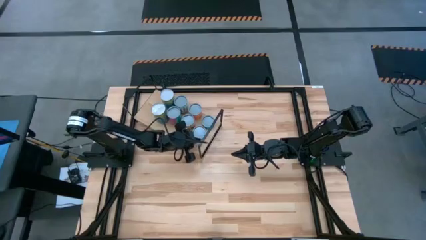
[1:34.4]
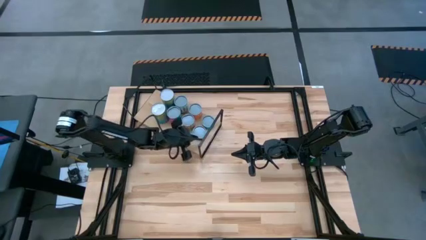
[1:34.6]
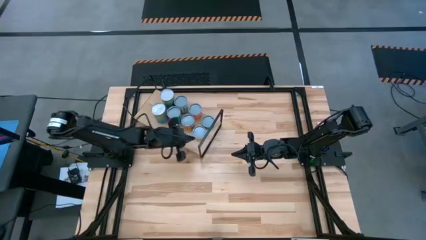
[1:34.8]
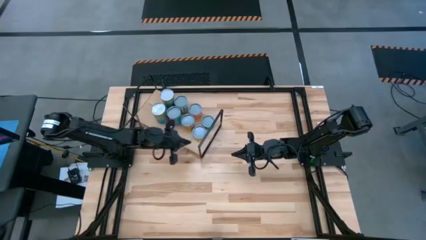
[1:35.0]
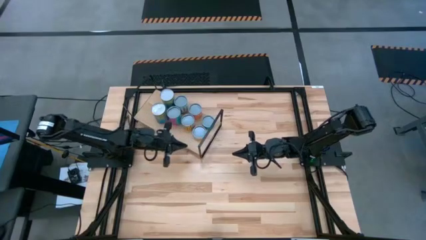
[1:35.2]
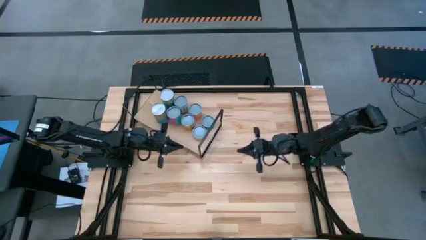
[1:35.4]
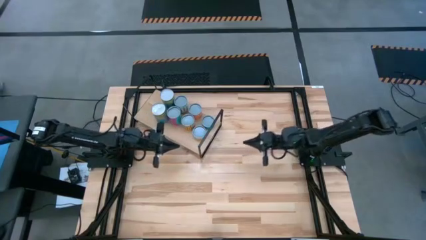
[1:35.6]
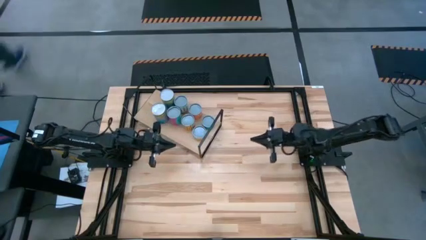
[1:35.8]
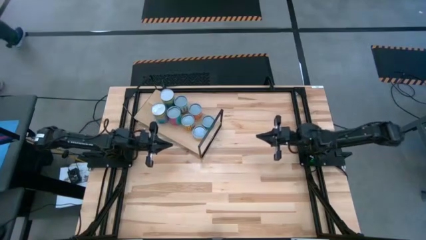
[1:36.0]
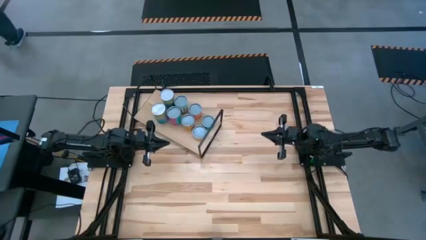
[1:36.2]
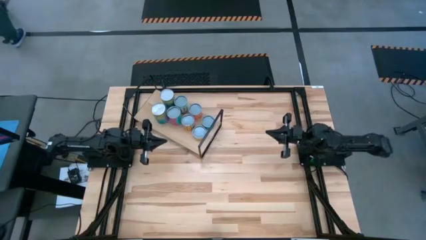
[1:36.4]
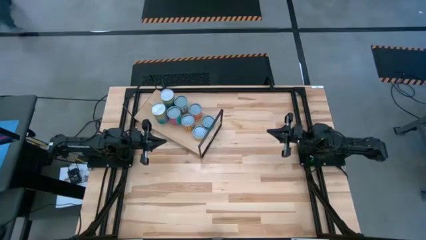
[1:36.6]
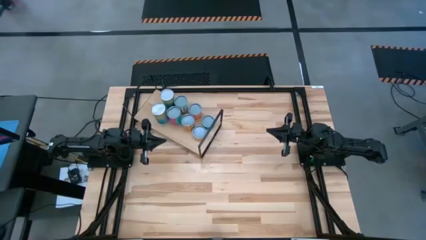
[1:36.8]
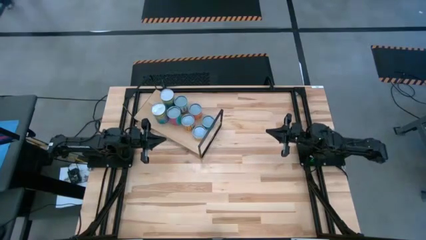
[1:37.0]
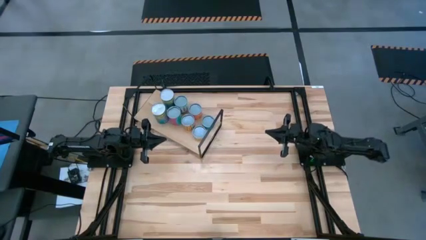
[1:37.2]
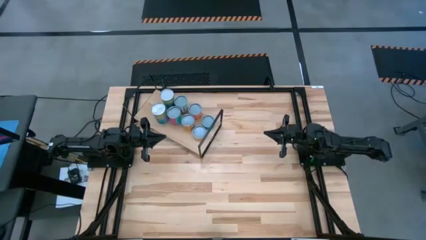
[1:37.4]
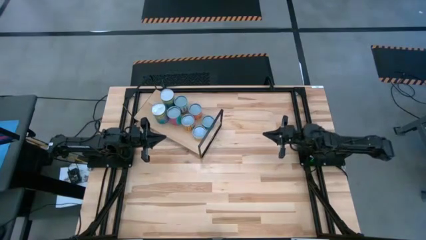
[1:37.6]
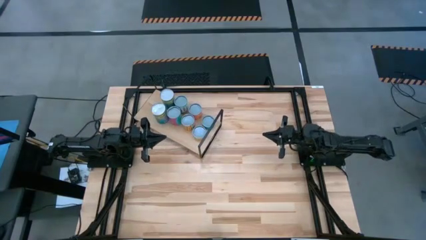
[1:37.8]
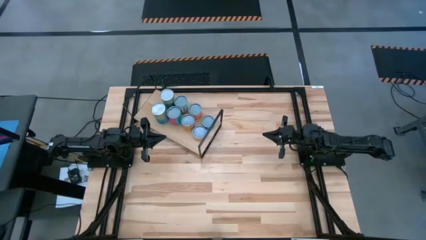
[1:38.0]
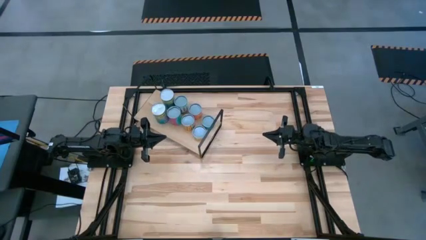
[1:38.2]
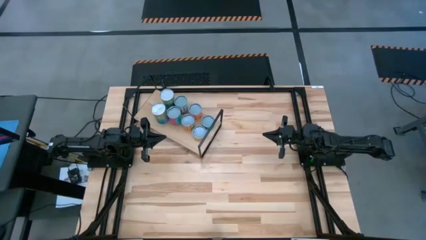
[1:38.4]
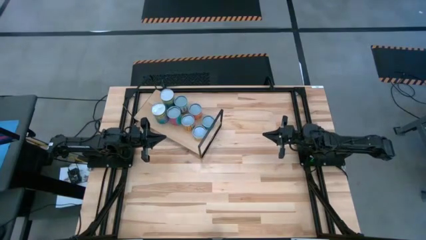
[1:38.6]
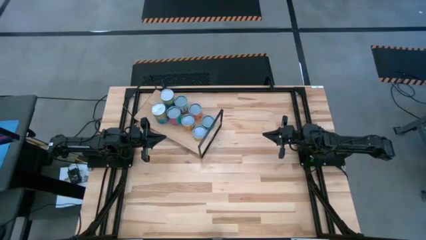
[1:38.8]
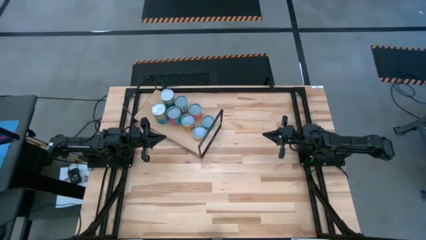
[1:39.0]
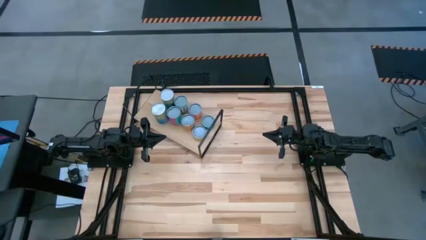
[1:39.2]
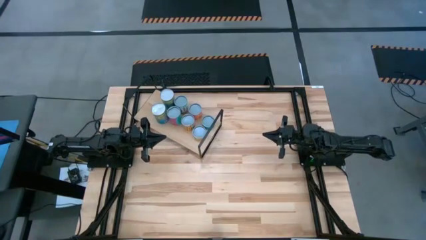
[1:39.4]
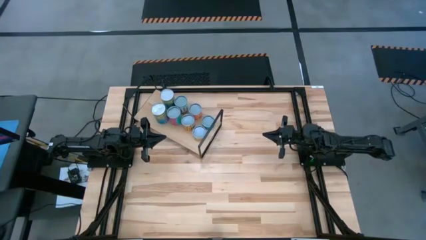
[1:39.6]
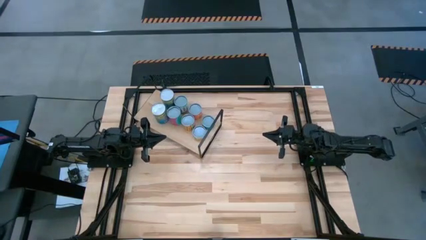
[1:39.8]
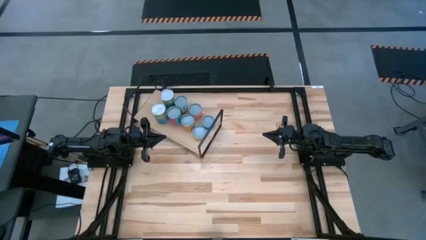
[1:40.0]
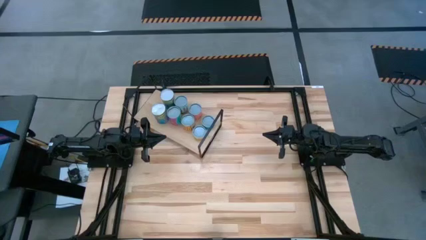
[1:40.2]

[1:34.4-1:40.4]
Task: Pick and place cans onto a shelf
Return to Home Position

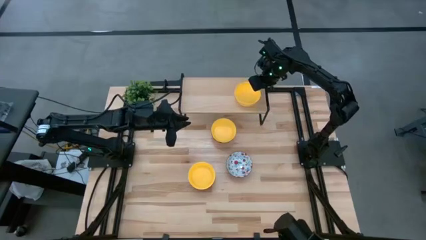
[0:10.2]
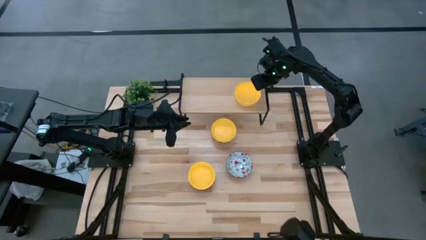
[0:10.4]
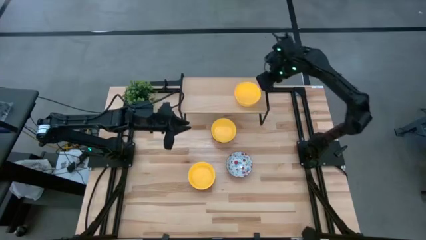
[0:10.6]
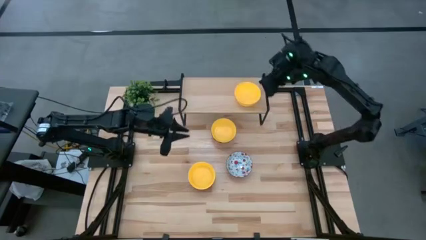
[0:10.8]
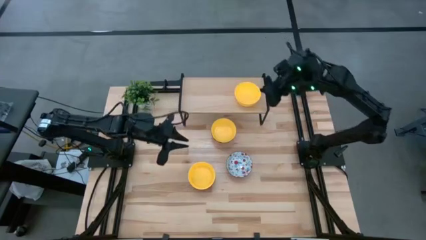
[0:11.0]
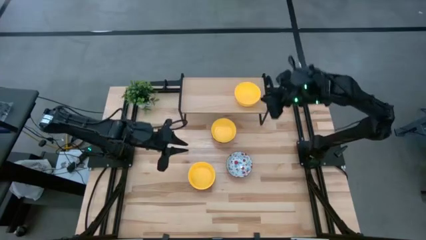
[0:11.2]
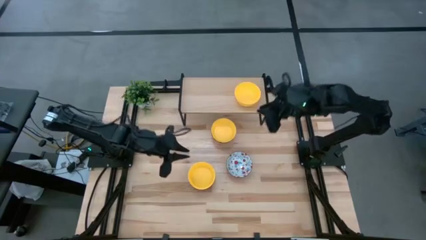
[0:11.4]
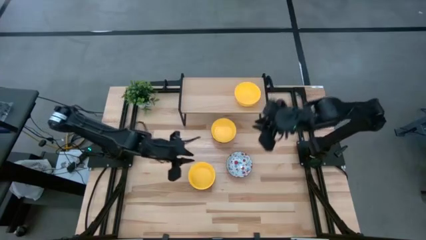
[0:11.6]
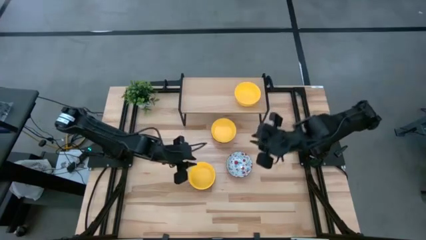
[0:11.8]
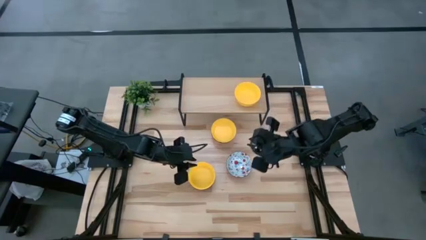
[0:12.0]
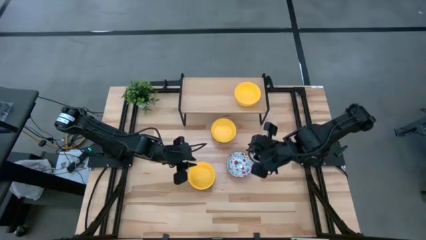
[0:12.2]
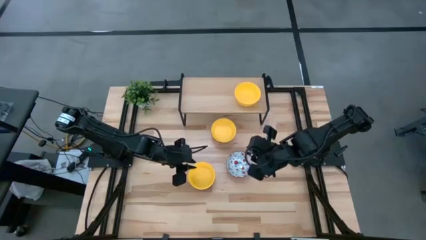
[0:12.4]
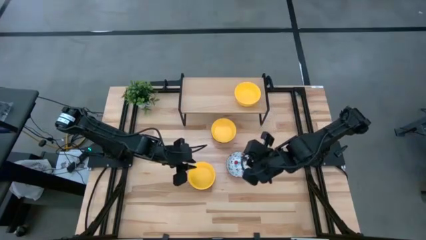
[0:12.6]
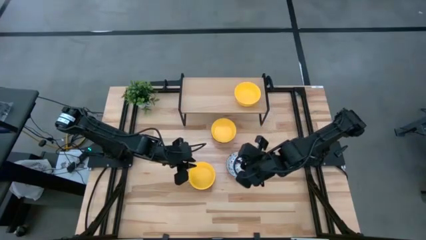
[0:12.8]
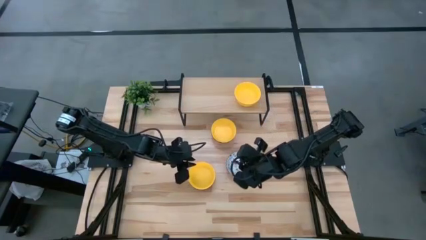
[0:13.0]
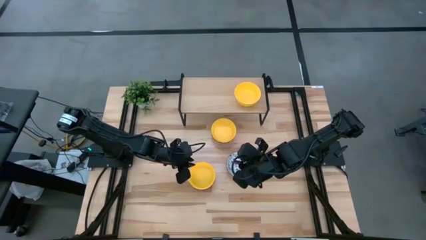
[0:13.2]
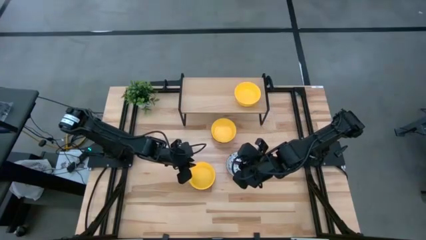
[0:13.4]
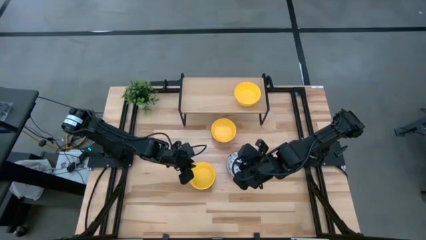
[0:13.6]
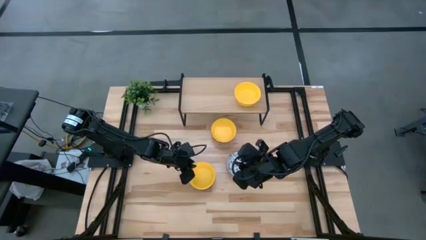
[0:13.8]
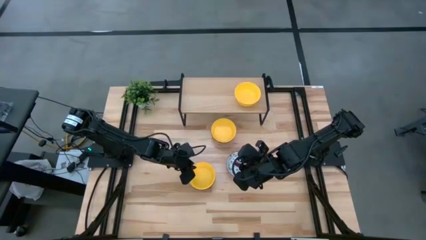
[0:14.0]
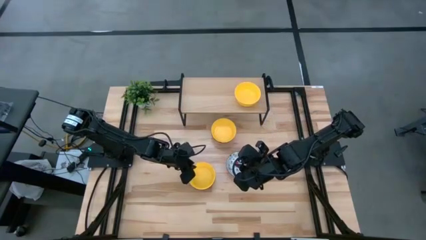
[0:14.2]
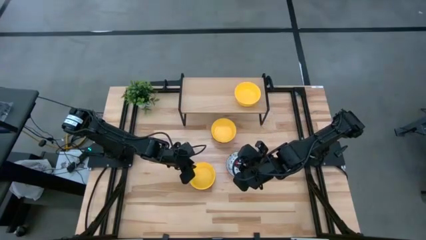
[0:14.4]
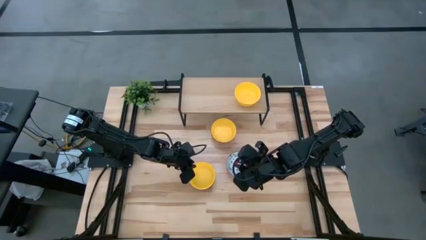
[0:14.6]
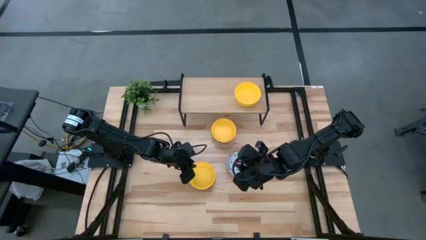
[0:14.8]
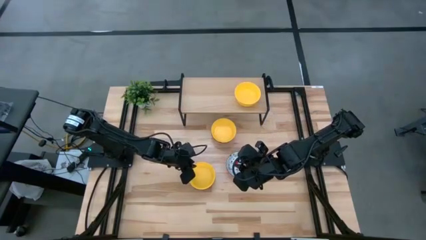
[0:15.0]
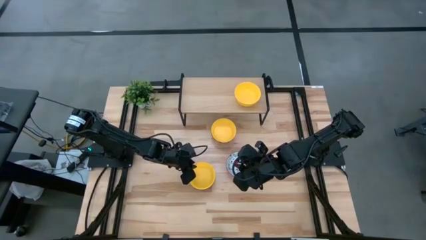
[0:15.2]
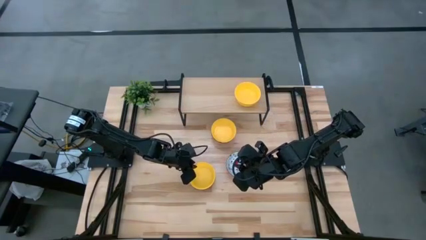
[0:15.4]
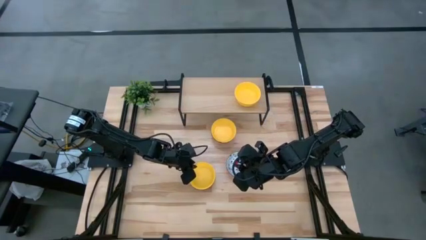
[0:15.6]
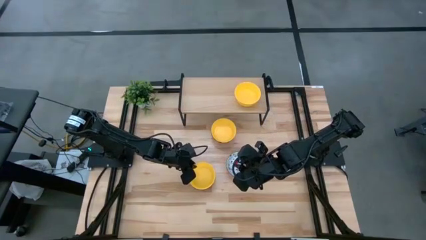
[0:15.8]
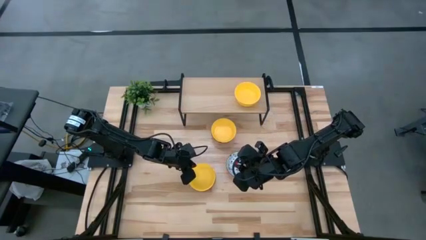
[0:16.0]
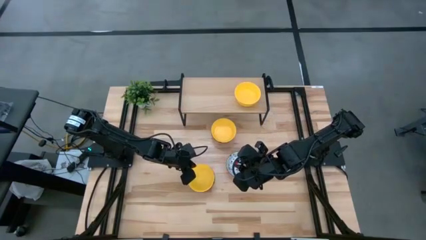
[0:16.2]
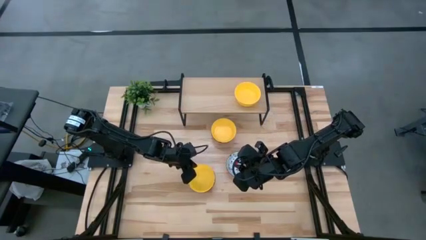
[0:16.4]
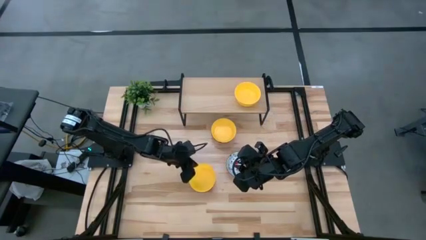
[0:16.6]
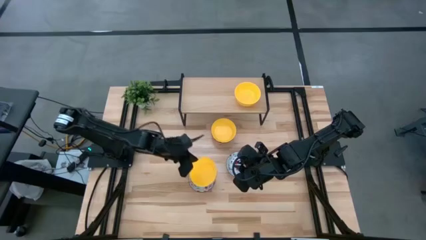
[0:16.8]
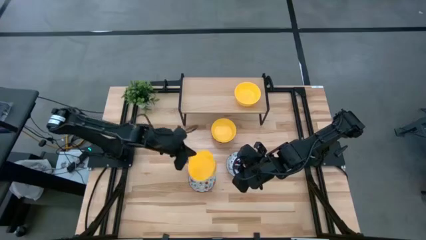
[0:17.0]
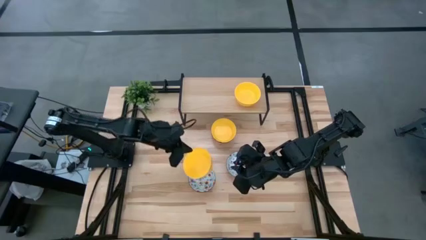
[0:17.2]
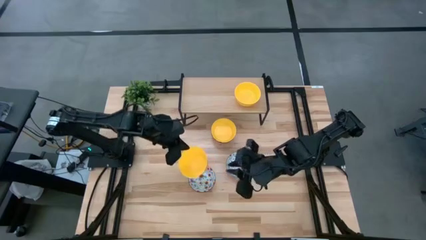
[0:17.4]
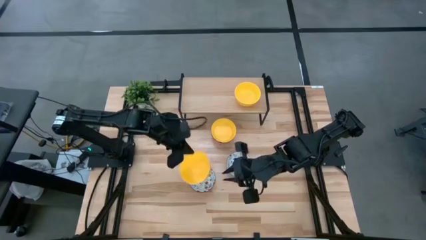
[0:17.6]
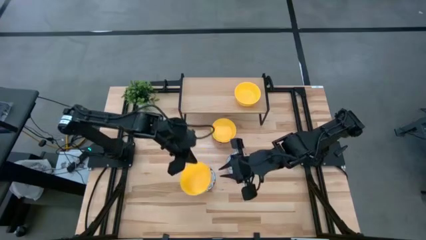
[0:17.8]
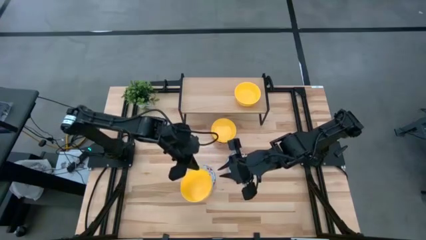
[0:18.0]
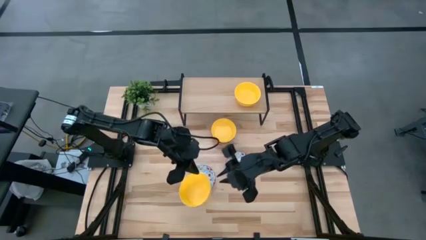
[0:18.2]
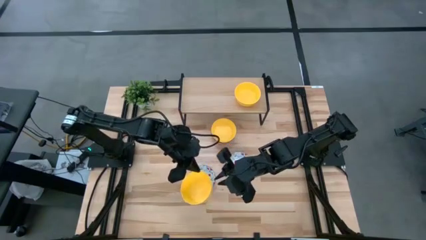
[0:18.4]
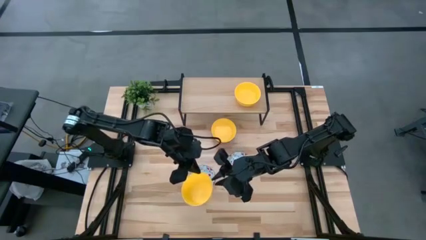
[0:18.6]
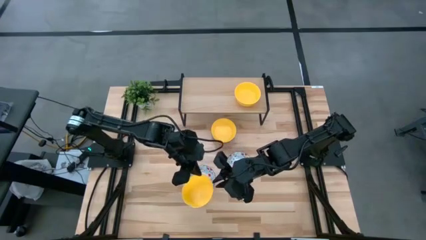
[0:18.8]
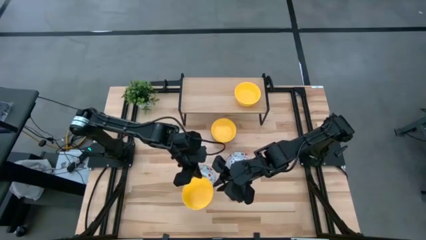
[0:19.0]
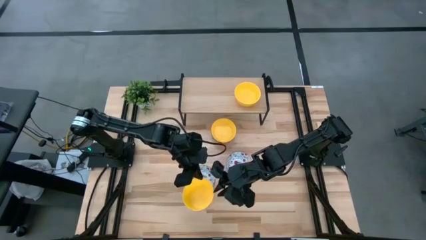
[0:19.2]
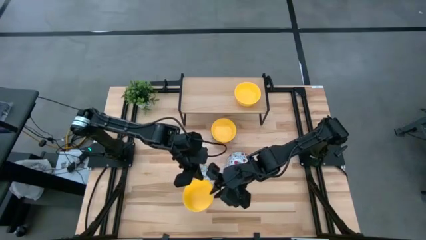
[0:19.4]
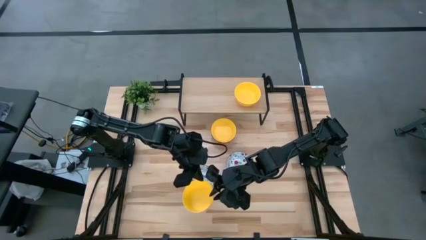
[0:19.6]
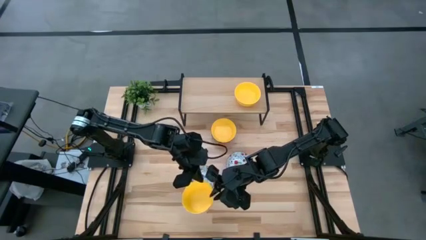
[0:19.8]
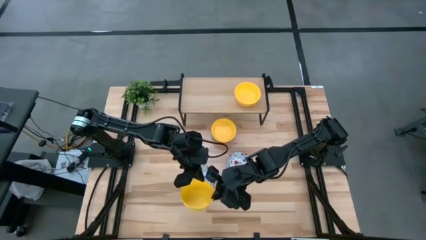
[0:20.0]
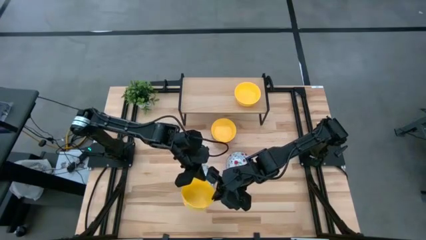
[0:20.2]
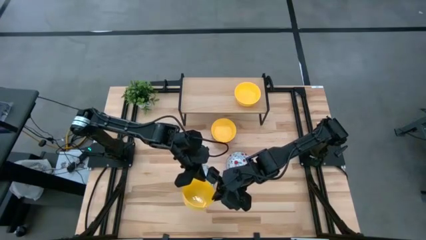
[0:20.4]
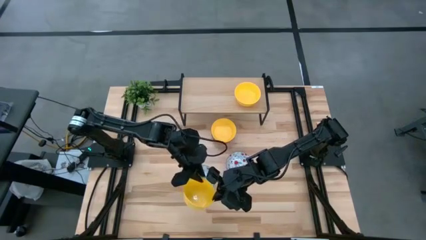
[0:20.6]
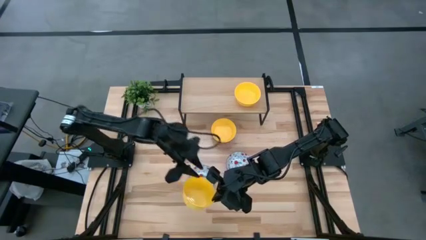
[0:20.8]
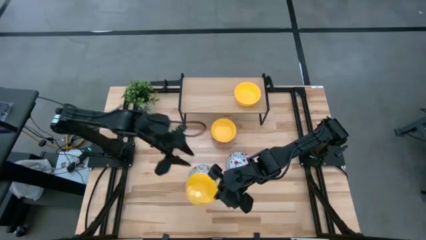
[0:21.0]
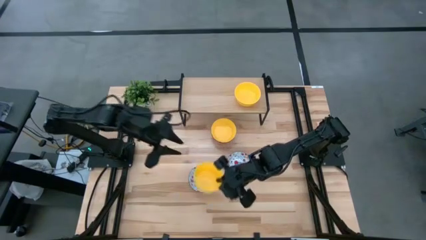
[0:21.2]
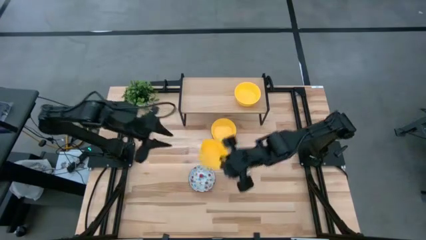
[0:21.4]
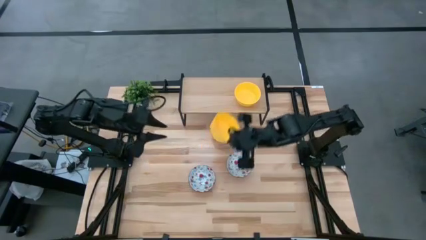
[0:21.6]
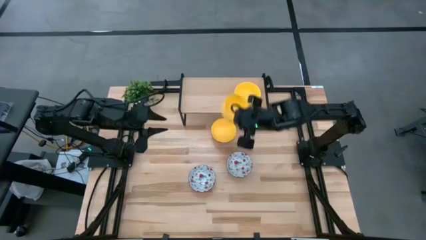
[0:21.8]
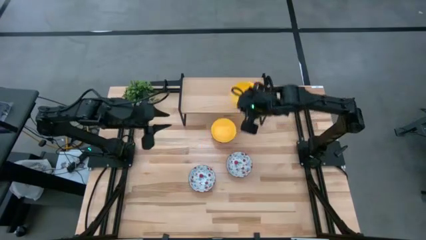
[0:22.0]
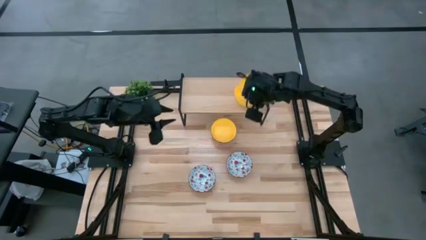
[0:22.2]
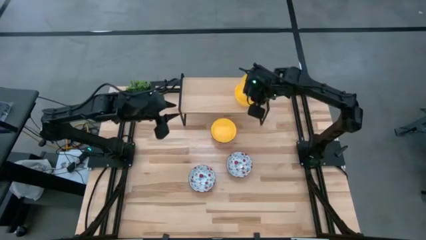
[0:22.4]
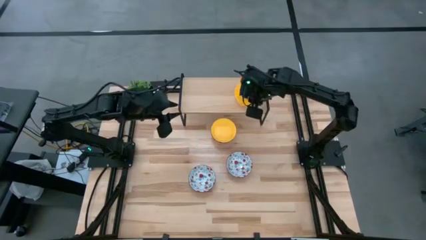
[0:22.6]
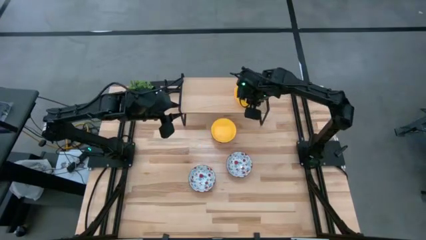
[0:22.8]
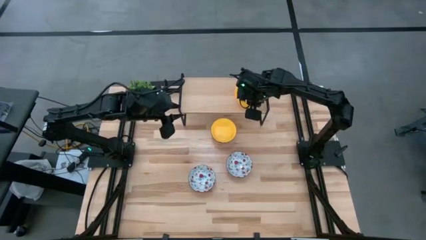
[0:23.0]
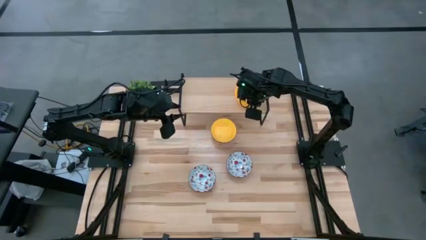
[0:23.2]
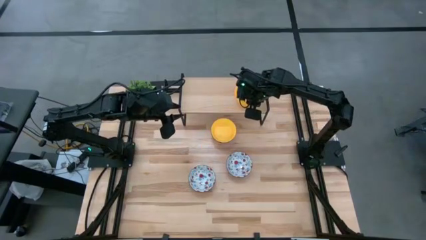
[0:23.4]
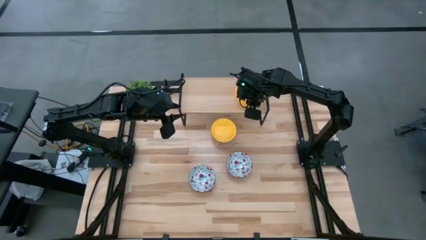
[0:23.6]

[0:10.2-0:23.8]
Task: Pick & Place Mini bowls
Stack the bottom yellow bowl on the yellow bowl on the shelf
